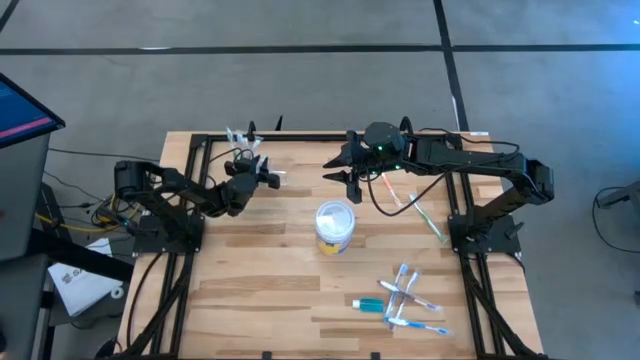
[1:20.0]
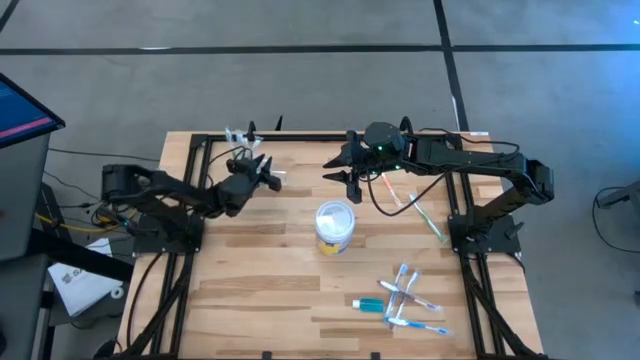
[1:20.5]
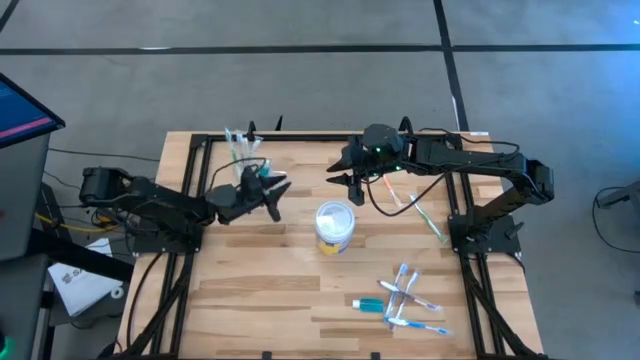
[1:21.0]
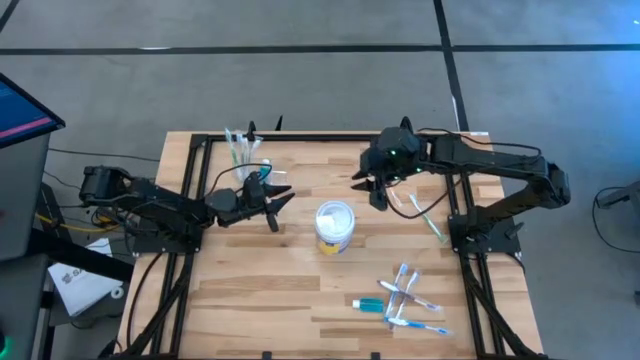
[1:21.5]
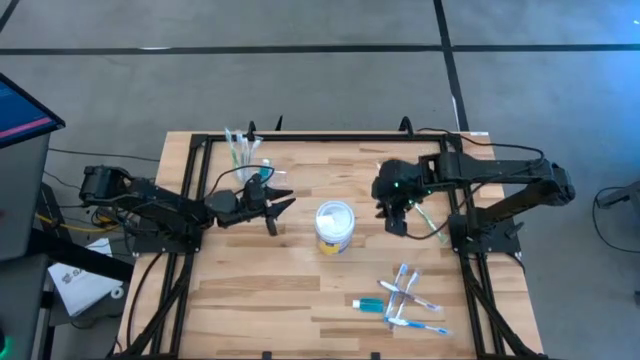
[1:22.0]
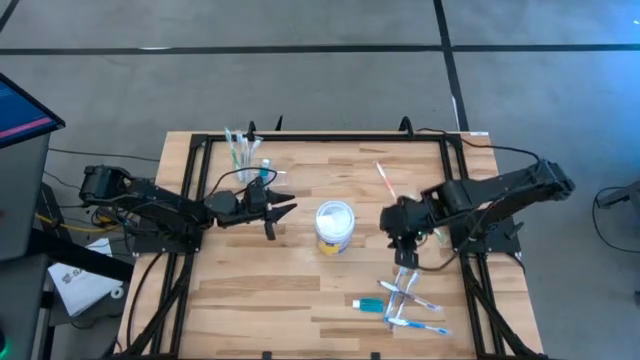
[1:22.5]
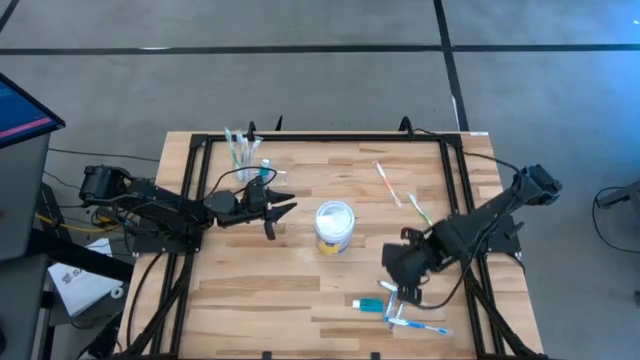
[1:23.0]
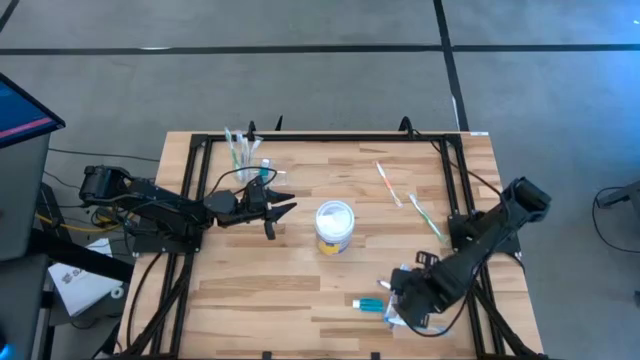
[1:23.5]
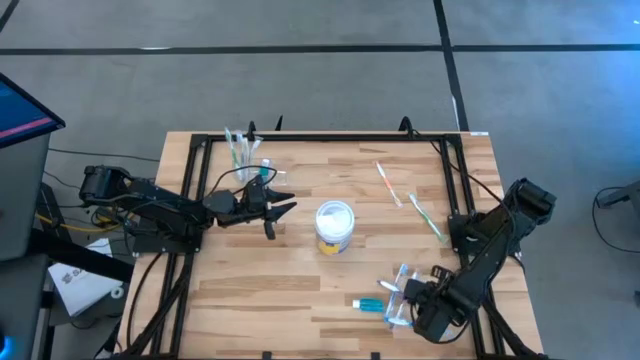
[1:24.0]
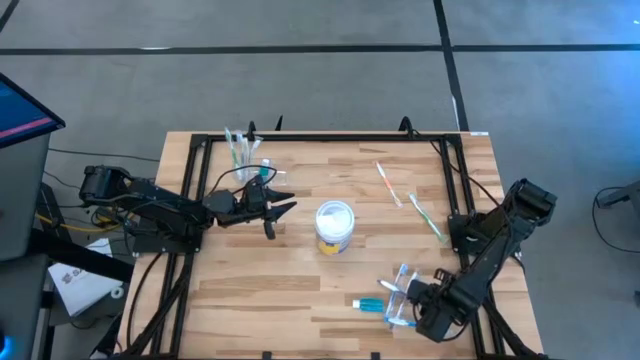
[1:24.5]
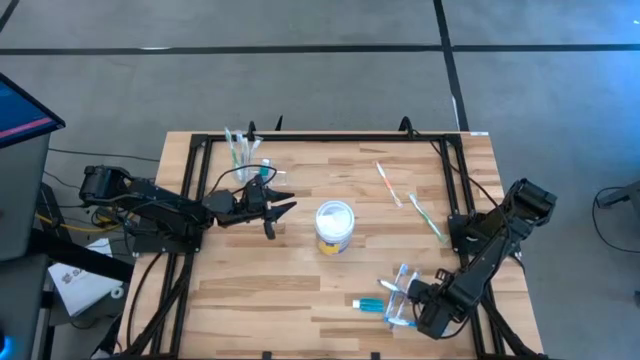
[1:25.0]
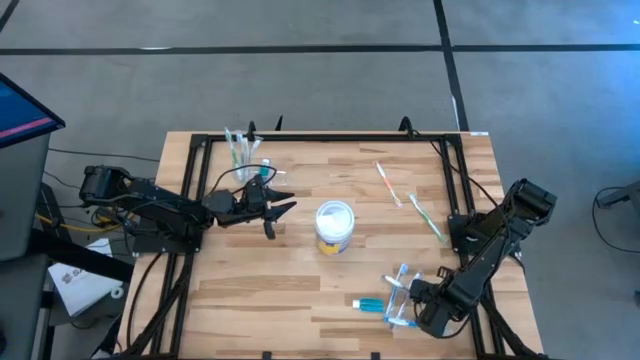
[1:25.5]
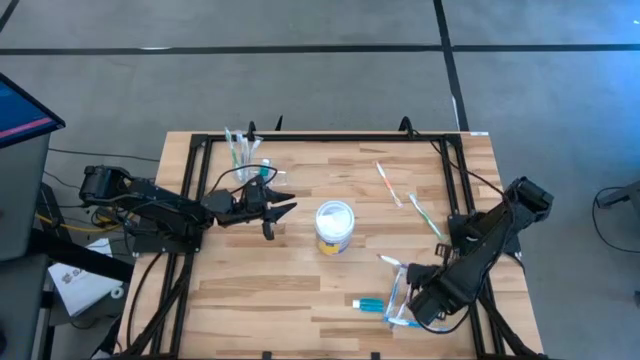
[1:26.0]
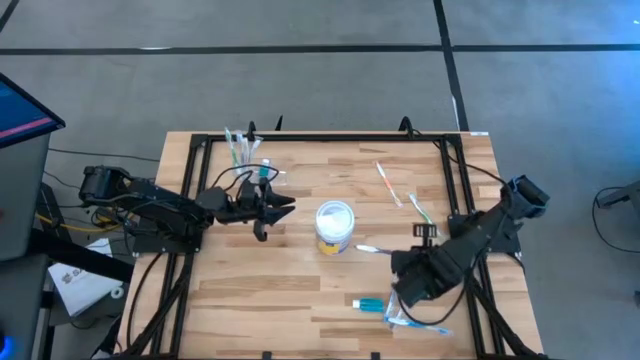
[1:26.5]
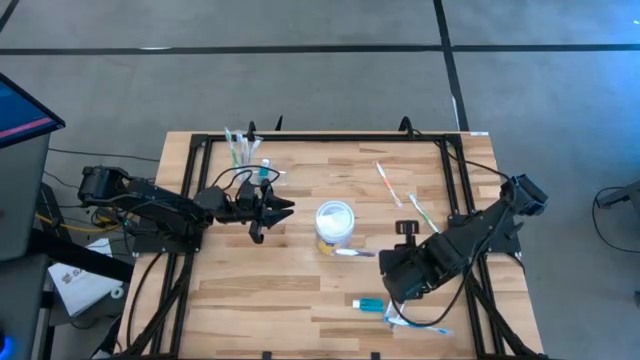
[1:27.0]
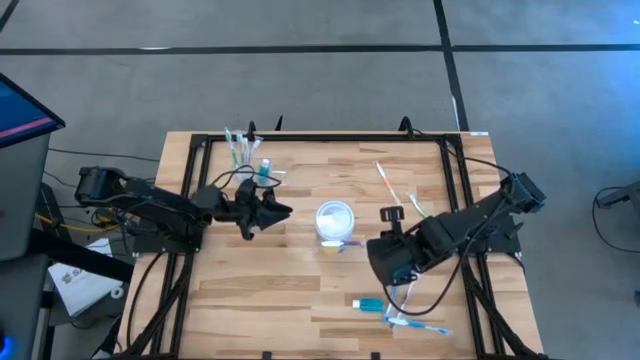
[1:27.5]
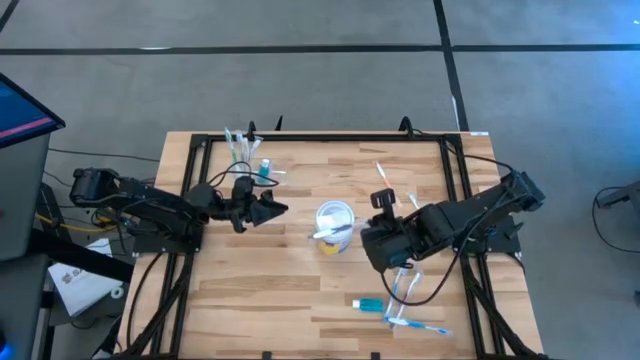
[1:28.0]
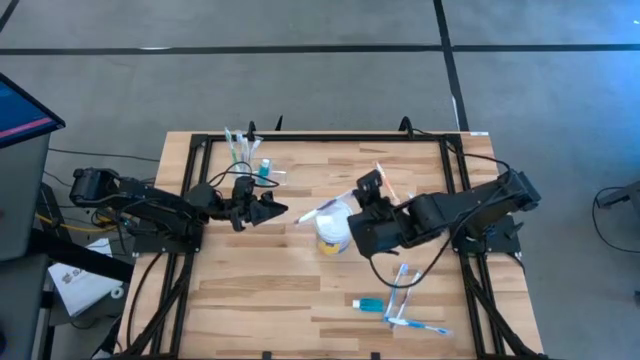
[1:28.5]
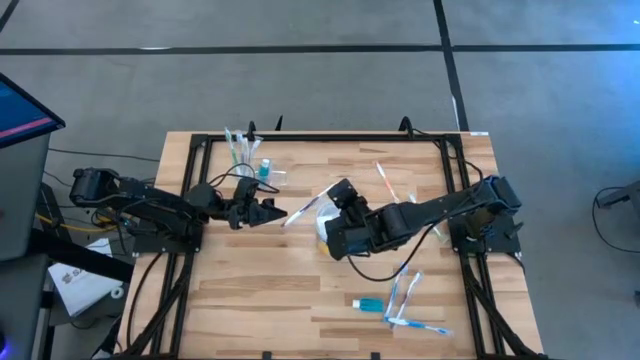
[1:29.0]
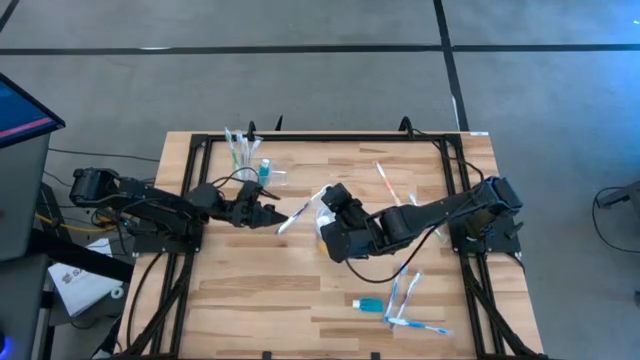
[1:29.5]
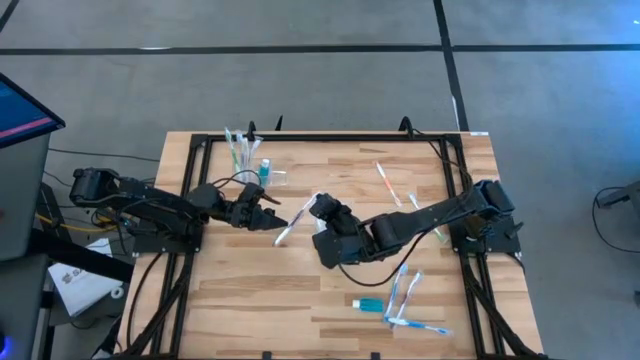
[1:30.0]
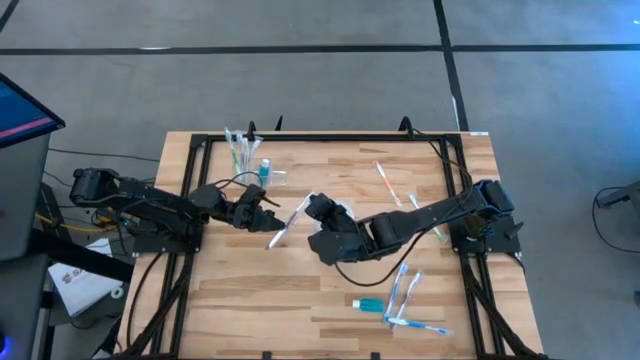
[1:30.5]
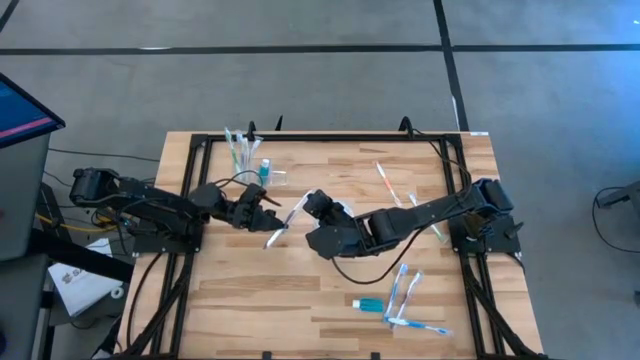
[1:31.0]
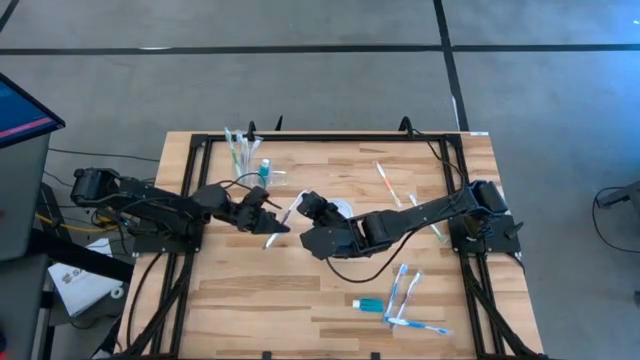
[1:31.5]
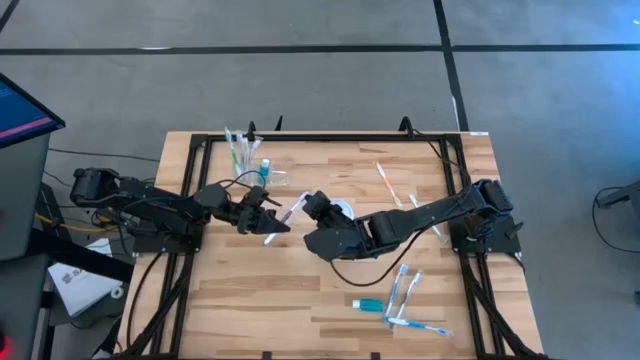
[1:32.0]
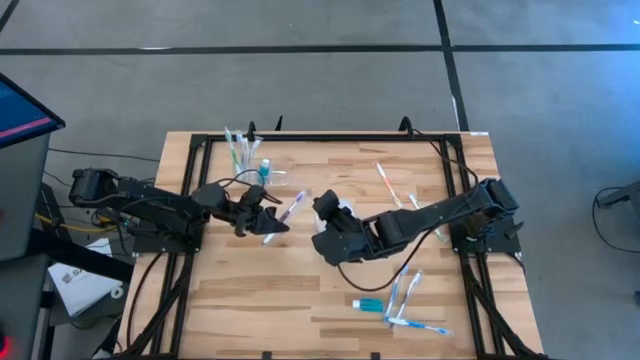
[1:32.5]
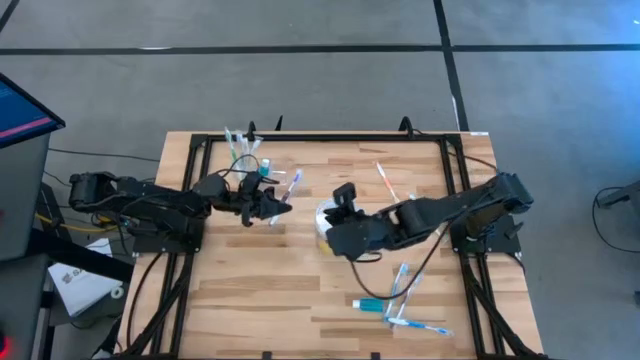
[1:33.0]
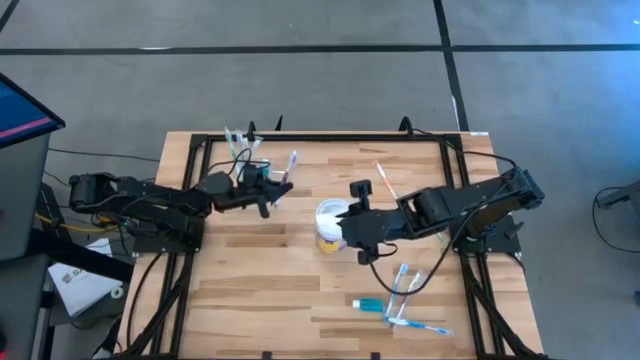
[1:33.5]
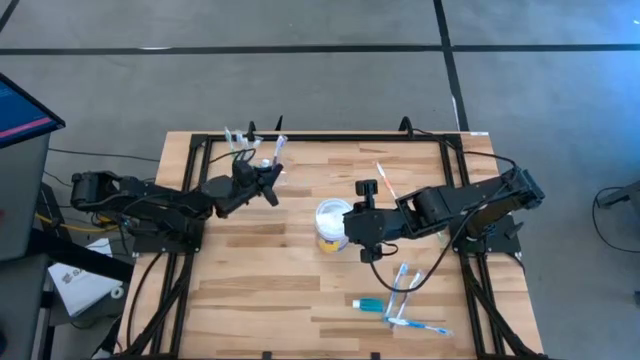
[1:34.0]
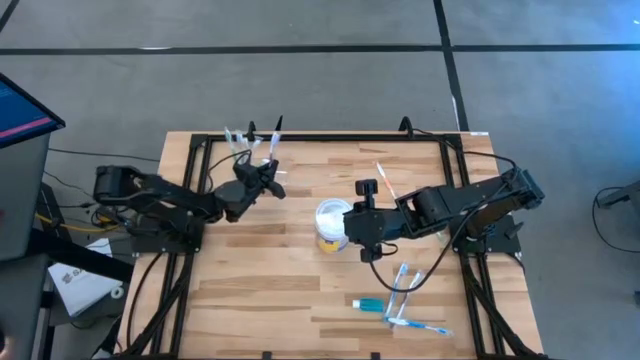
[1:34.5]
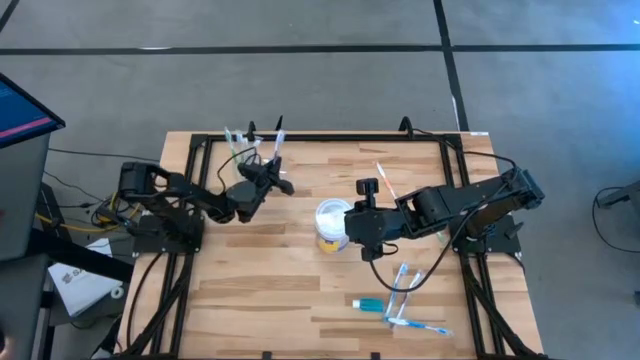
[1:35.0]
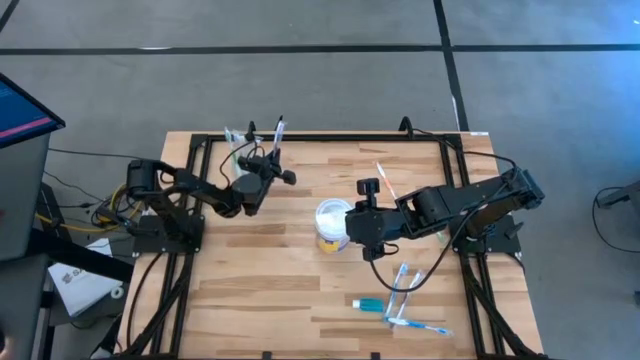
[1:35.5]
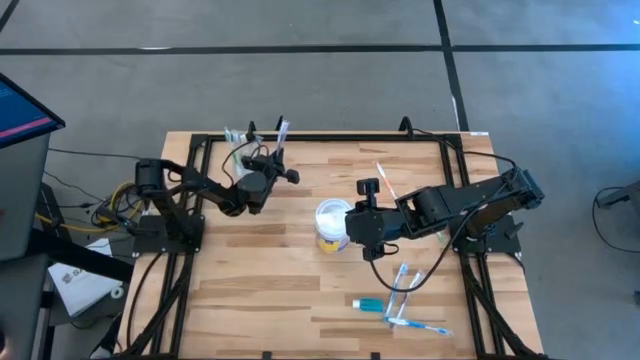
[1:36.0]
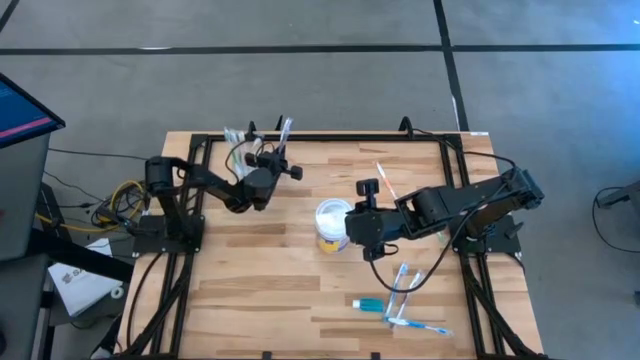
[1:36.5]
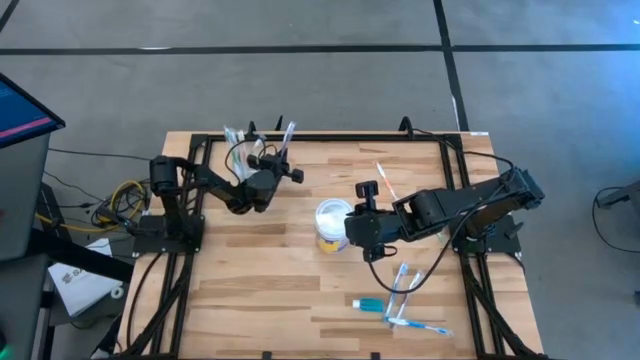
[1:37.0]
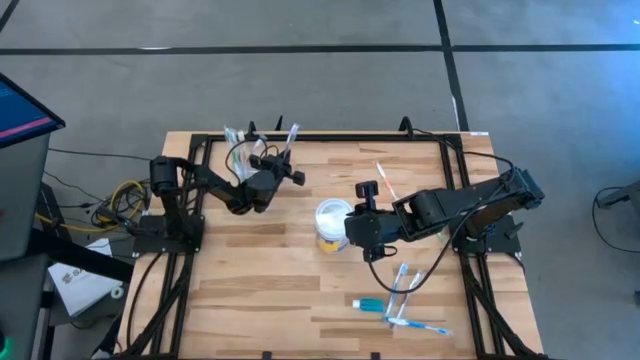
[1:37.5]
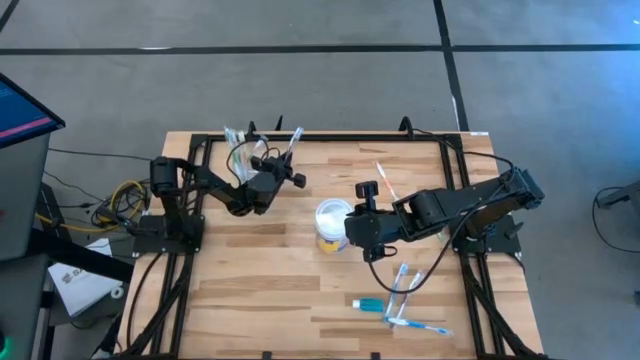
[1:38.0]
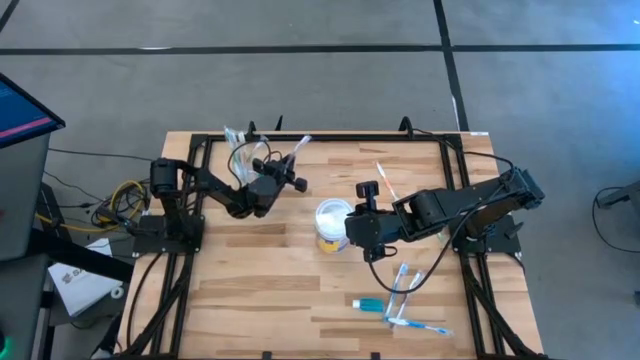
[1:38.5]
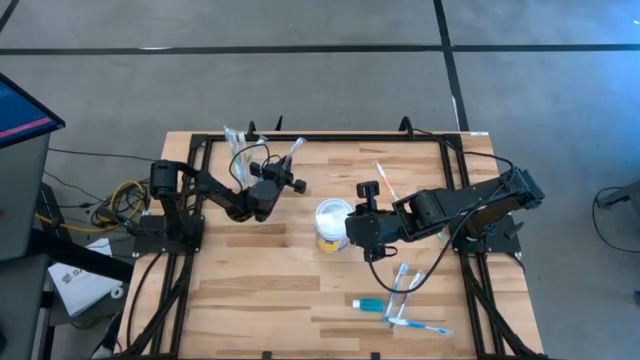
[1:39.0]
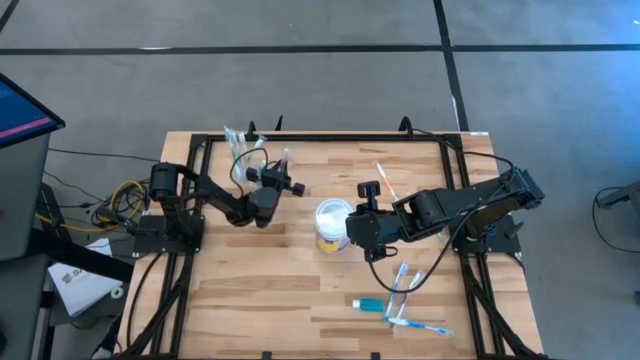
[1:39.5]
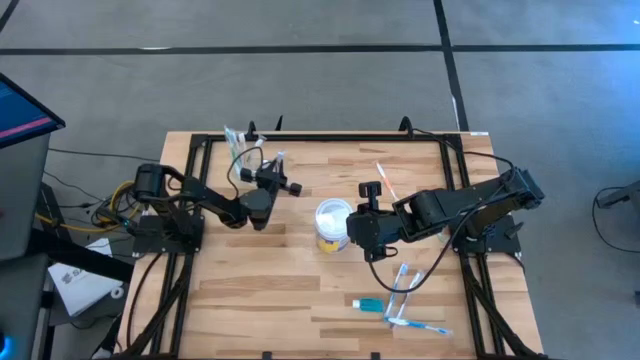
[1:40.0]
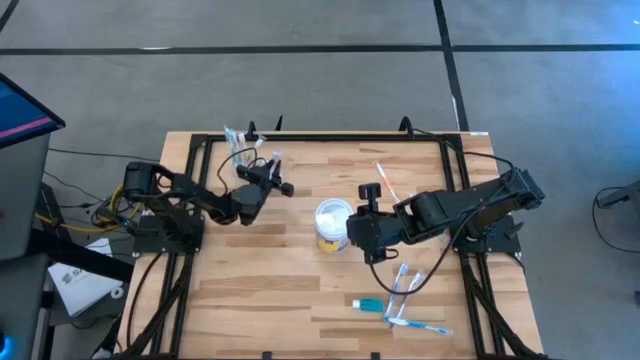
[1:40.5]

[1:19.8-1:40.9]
Task: Pick & Place toothbrushing station
Put the top purple toothbrush into the transparent organizer

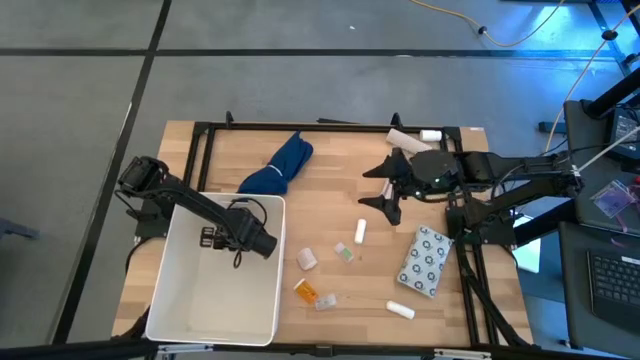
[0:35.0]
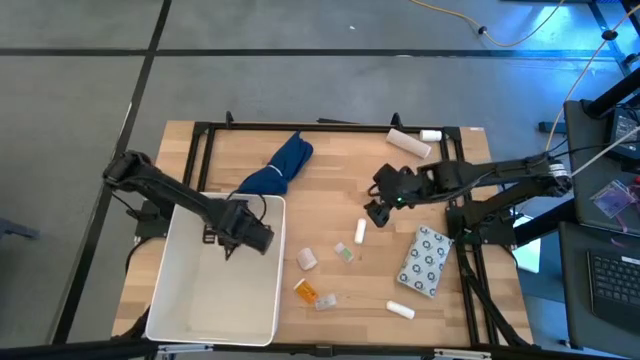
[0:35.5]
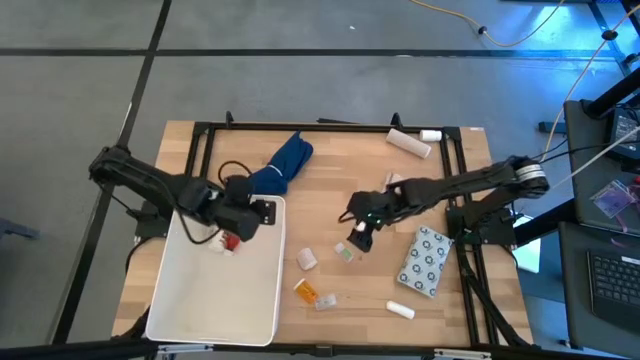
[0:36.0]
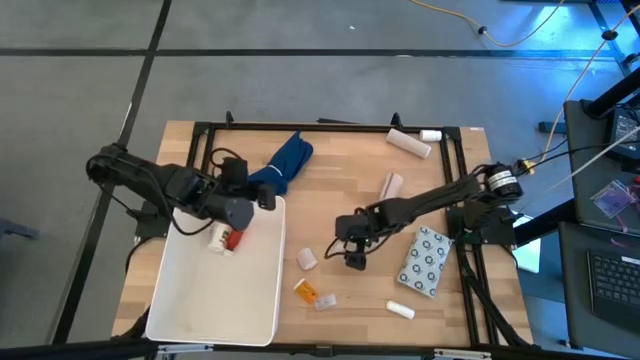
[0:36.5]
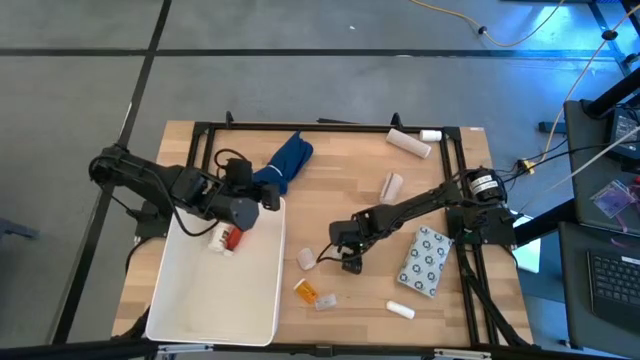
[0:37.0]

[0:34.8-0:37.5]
Task: Pick & place medical supplies in basket/bin
Put the top transparent medicine bottle into the white bin
